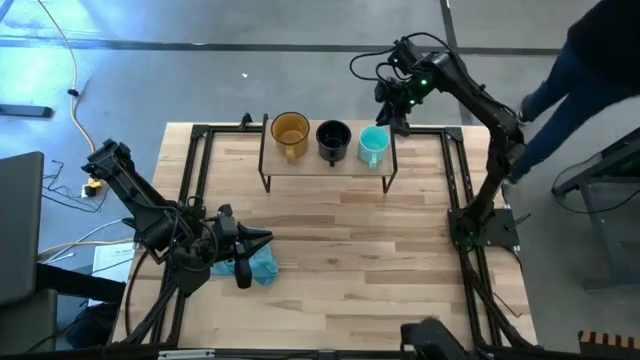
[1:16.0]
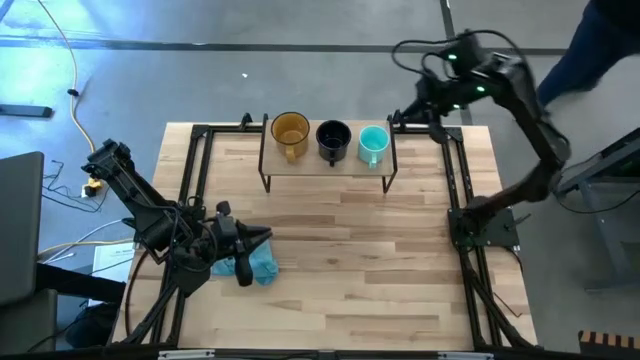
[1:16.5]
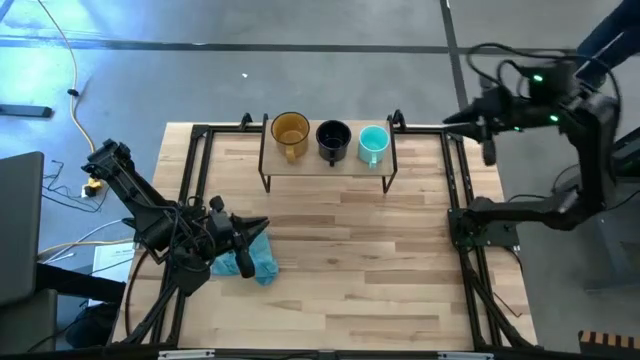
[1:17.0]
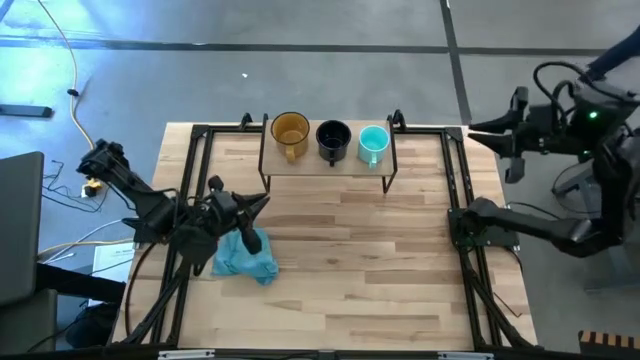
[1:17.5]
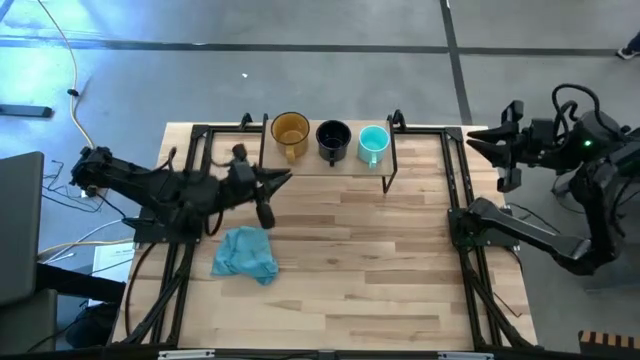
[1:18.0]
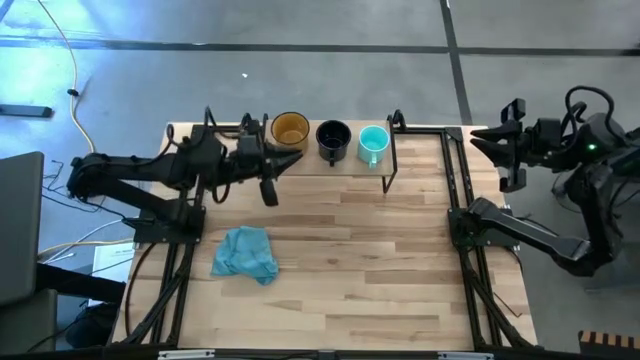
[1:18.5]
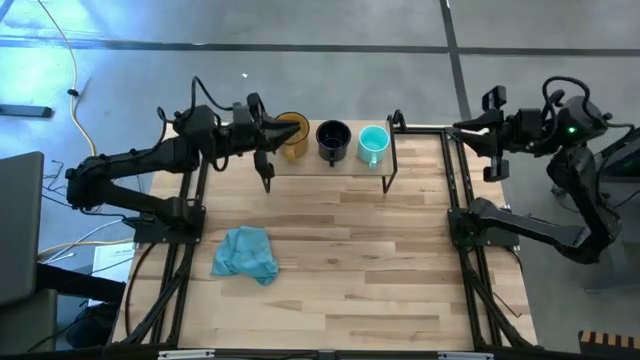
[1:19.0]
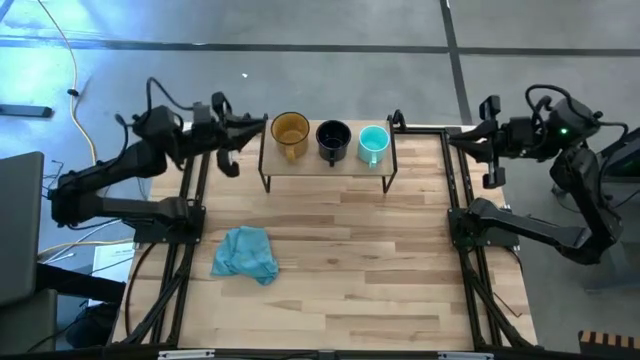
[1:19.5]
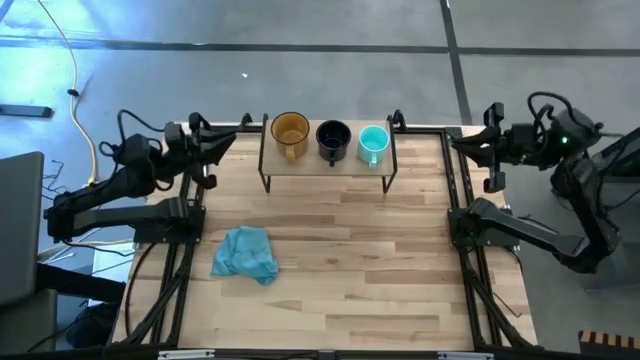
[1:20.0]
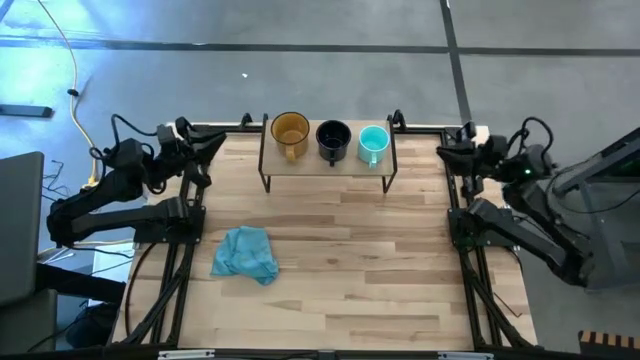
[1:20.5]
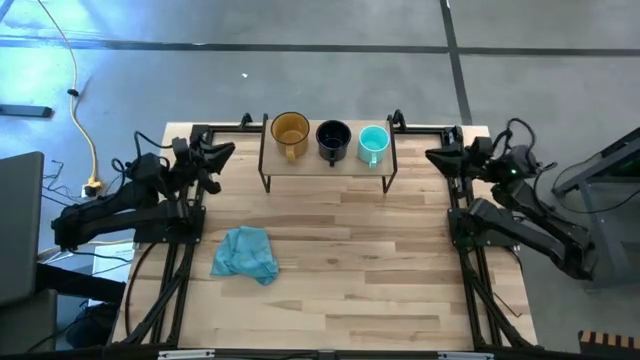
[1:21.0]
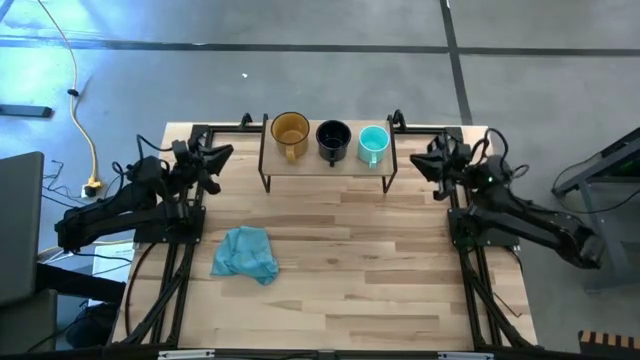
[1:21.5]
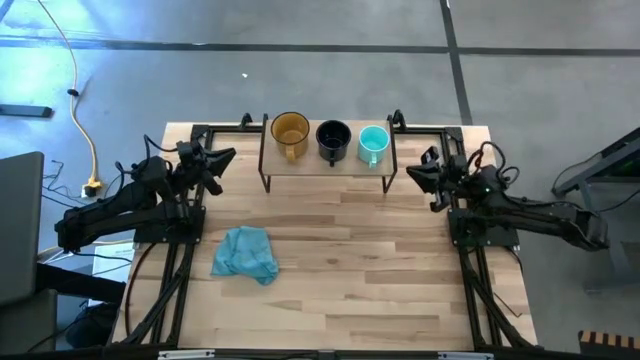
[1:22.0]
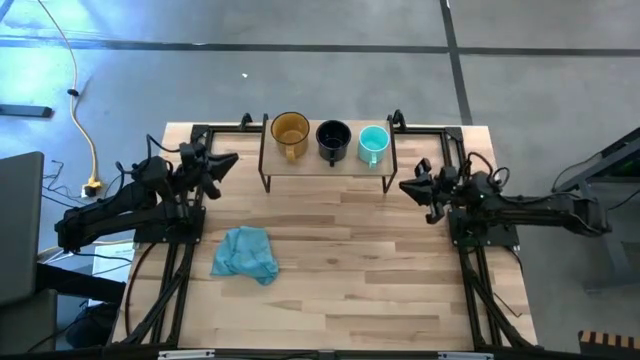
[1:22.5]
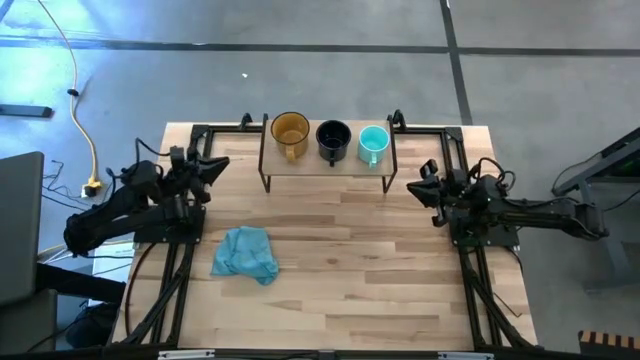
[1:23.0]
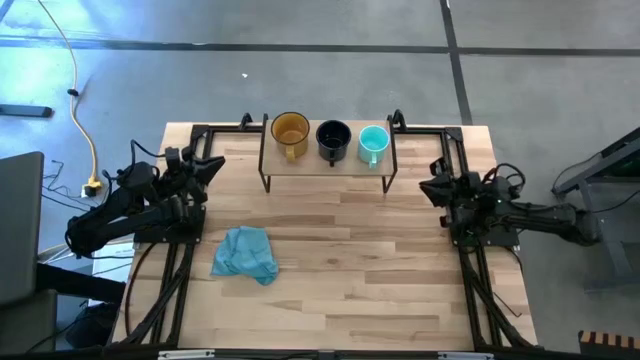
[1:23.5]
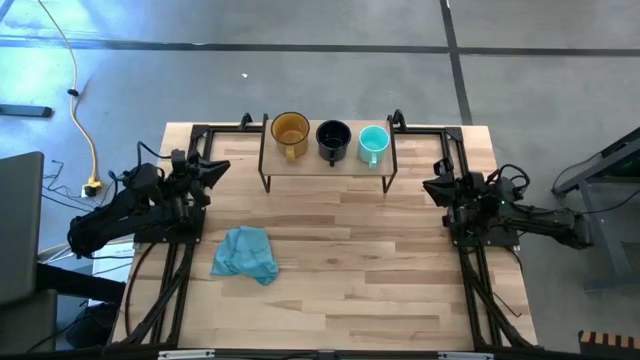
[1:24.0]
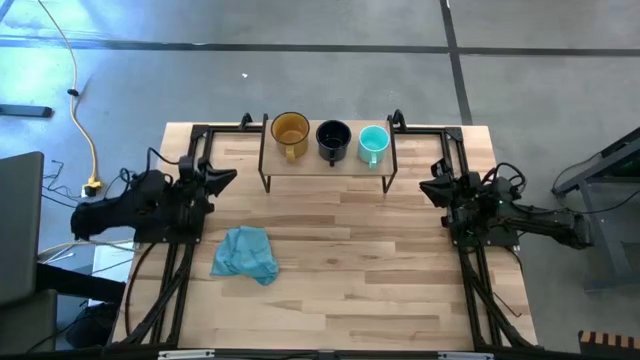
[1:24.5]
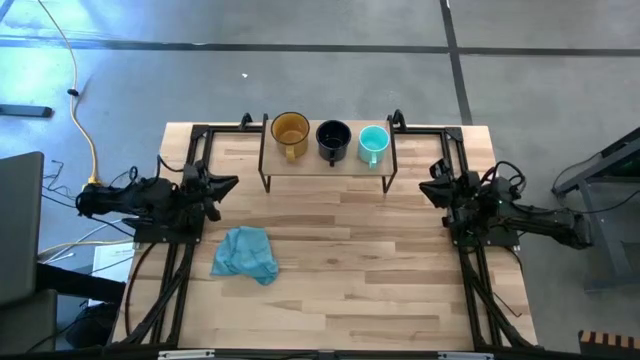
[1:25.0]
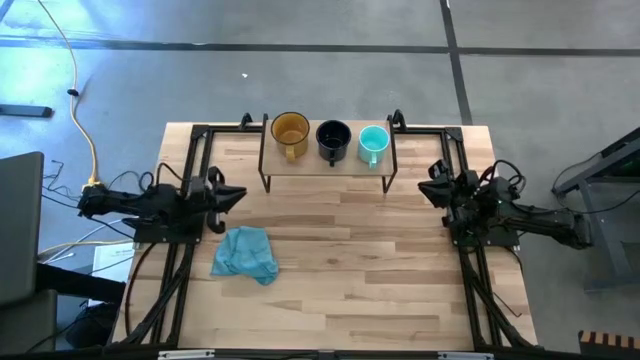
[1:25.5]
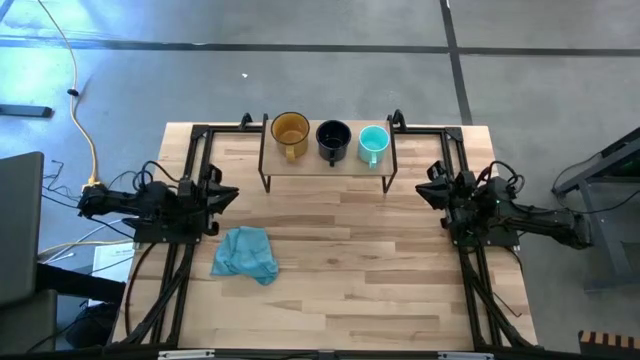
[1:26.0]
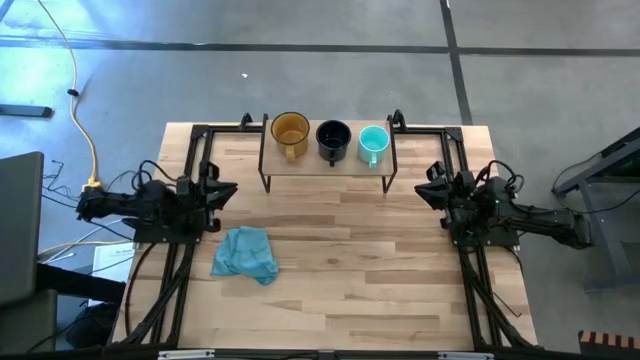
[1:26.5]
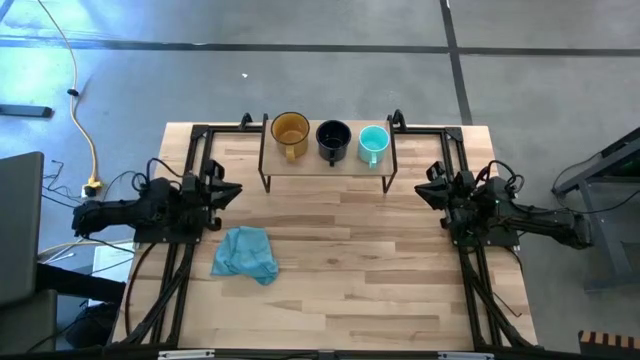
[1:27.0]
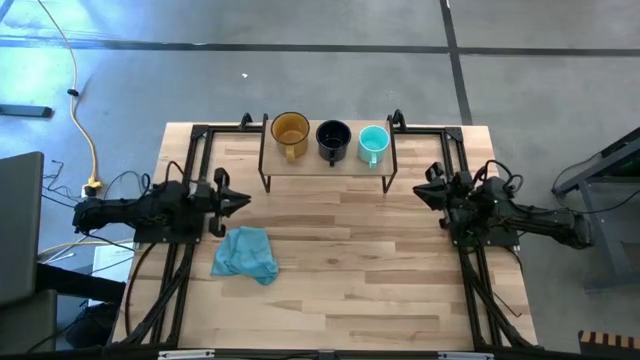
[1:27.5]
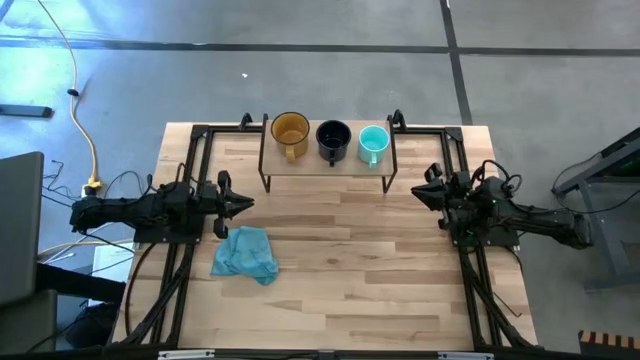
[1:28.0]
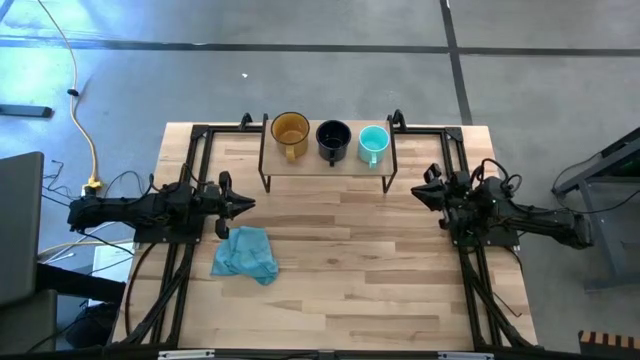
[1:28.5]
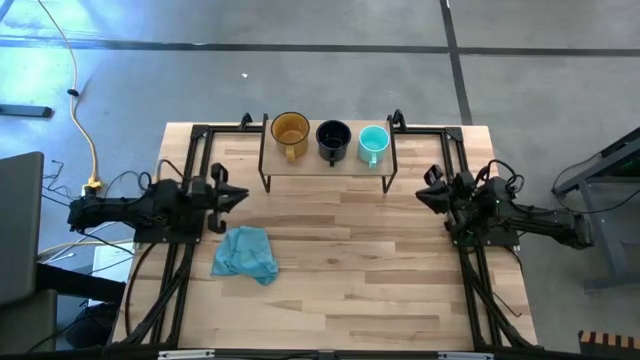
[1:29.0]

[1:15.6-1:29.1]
Task: Stack small to large cups/mugs on shelf
Return to Home Position

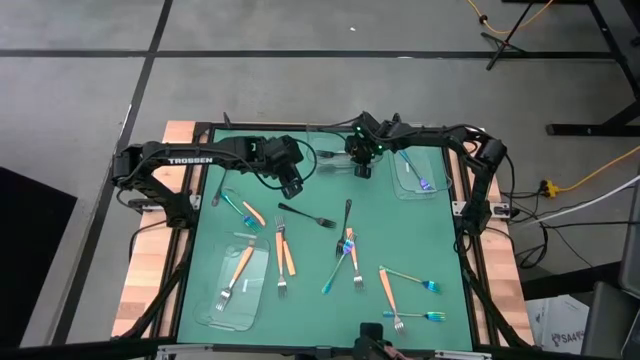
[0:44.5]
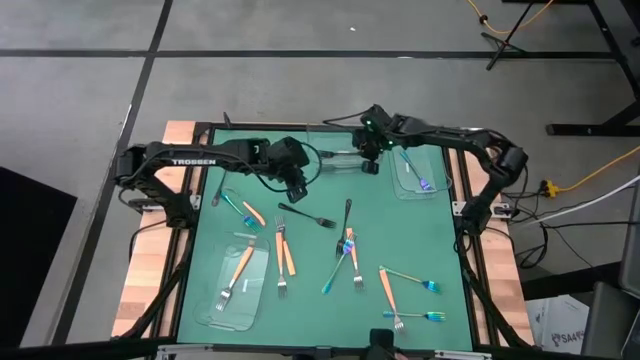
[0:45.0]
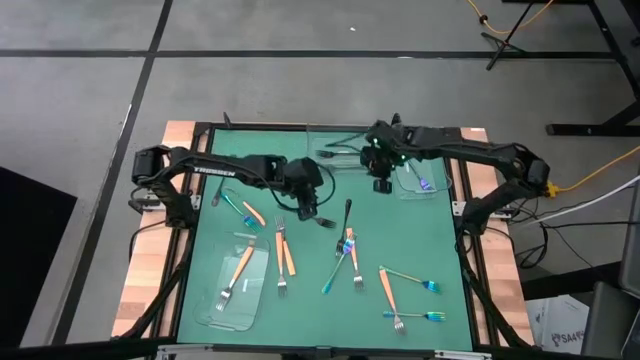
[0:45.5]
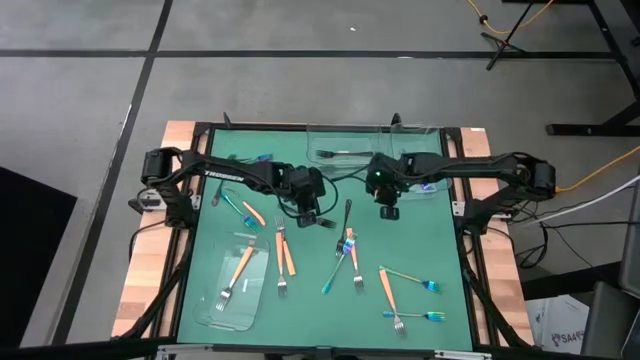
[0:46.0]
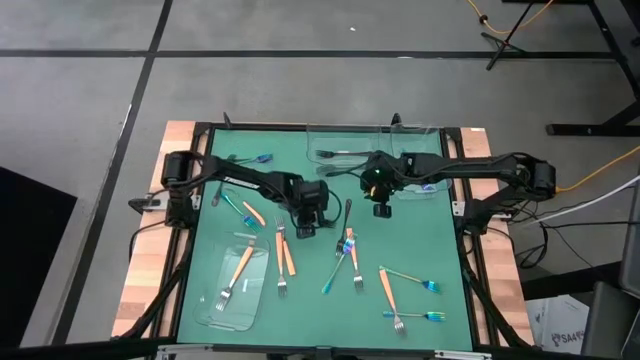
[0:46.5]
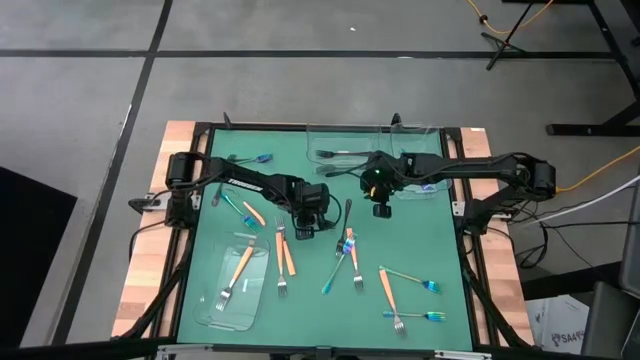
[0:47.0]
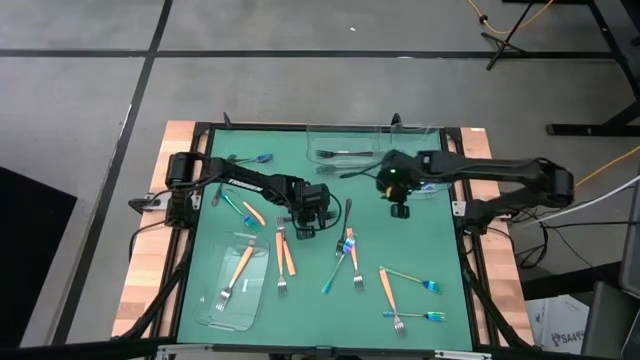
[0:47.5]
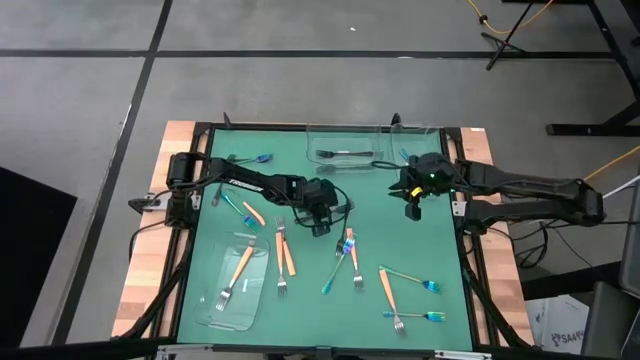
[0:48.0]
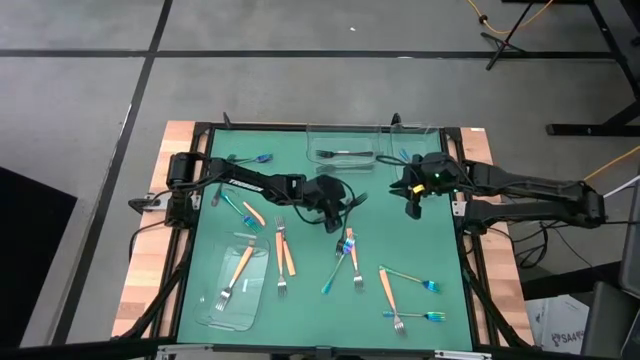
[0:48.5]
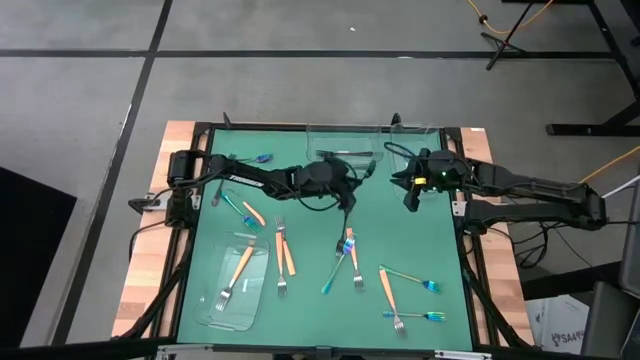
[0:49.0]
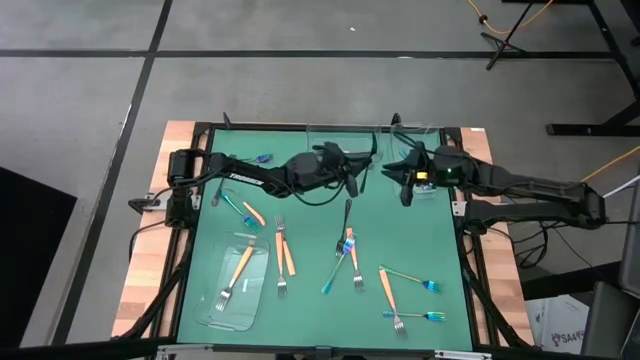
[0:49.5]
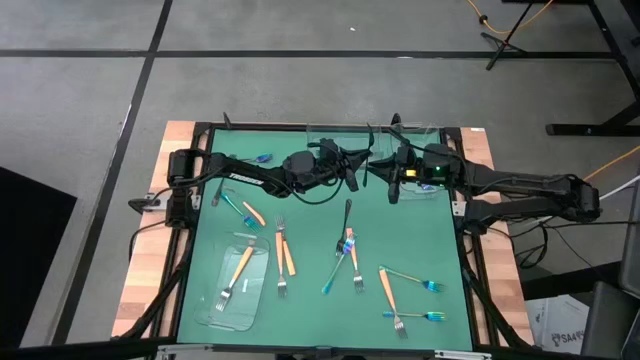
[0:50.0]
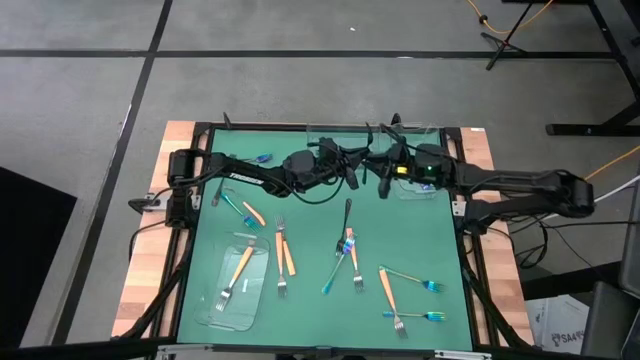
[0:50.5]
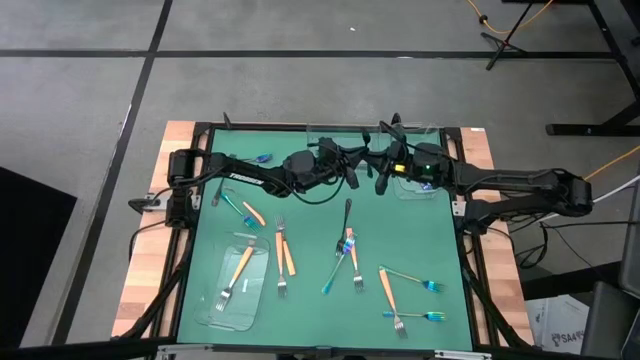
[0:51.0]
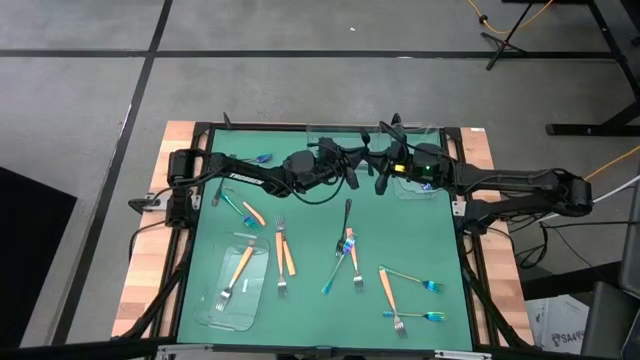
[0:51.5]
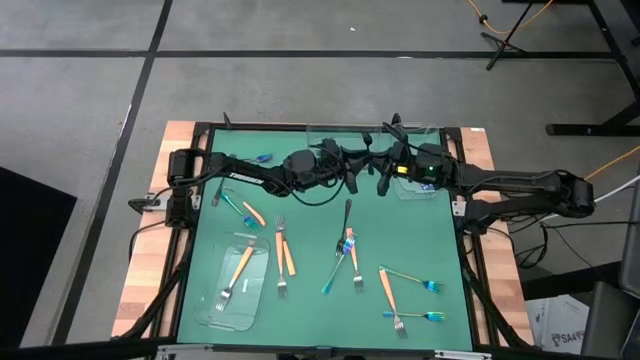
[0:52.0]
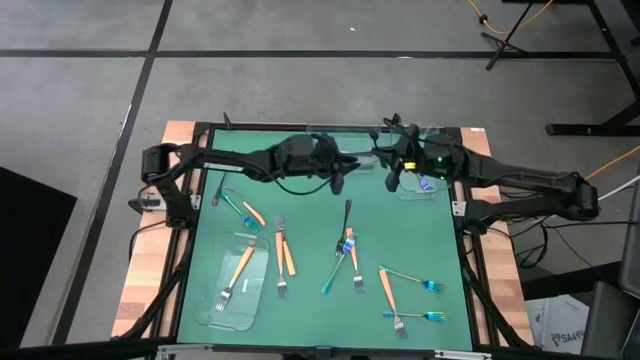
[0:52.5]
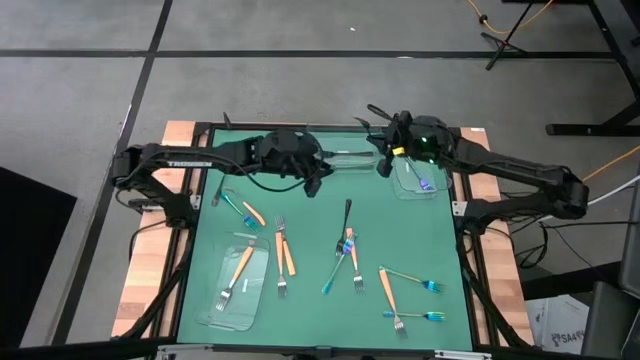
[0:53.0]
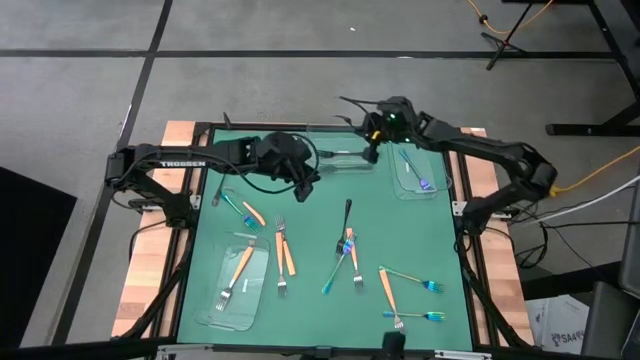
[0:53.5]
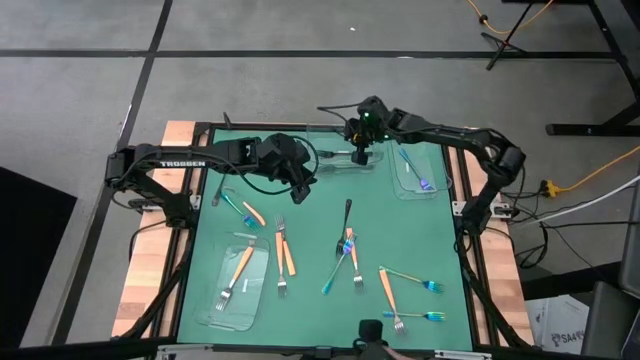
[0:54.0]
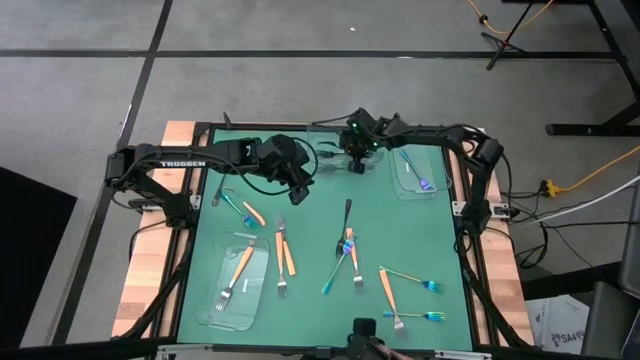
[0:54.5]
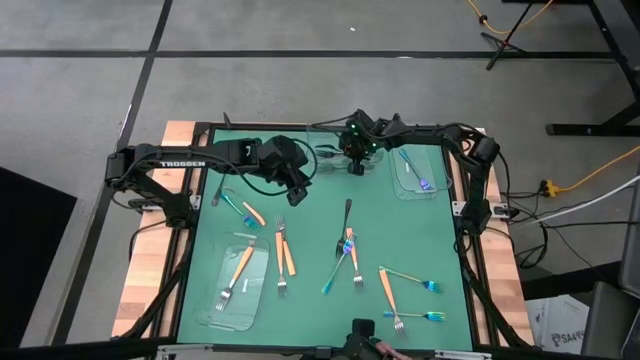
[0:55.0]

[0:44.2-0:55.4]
Task: Sort silverware by color (type)
Put the black fork into the top left transparent bin
